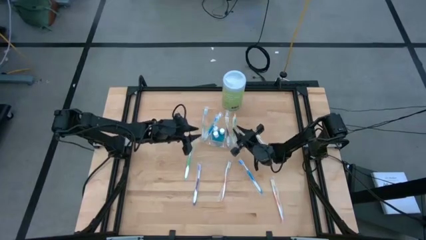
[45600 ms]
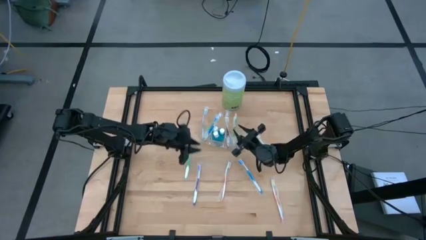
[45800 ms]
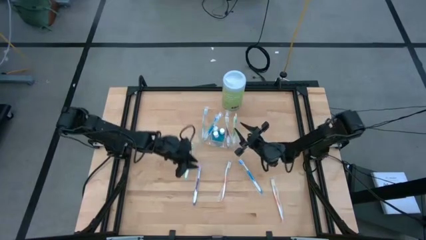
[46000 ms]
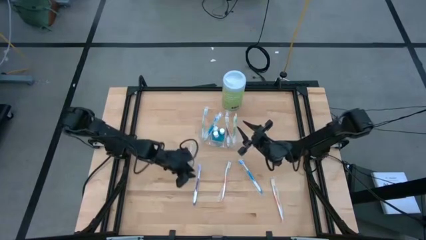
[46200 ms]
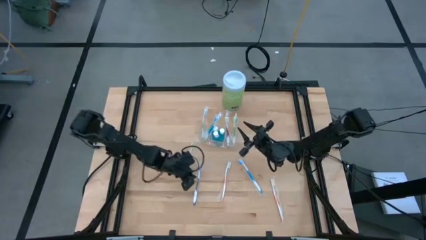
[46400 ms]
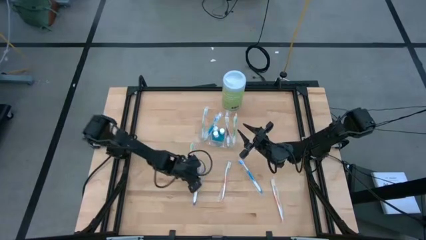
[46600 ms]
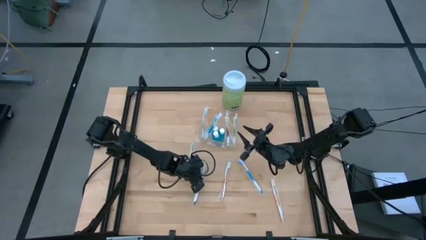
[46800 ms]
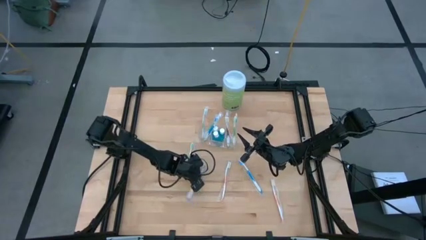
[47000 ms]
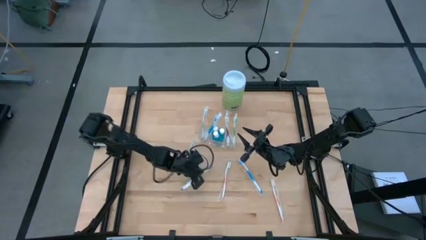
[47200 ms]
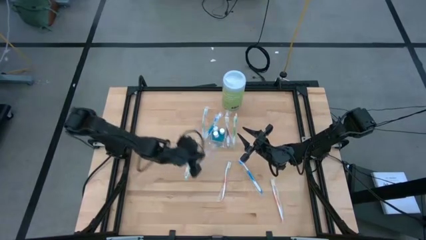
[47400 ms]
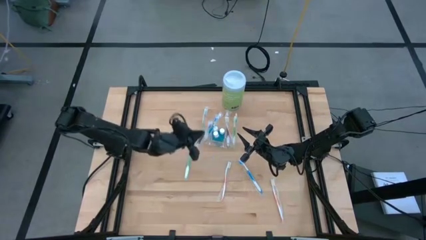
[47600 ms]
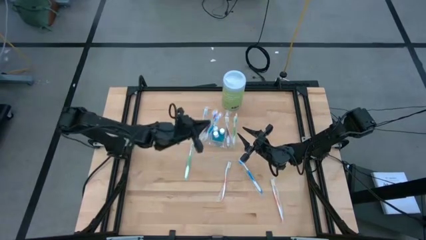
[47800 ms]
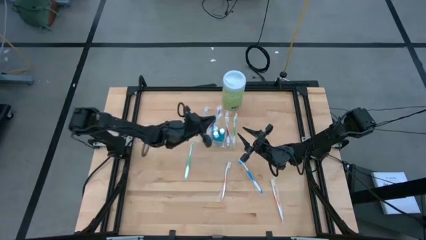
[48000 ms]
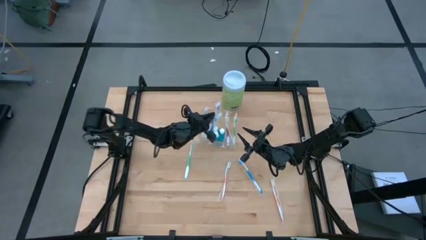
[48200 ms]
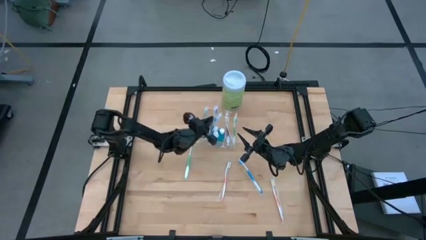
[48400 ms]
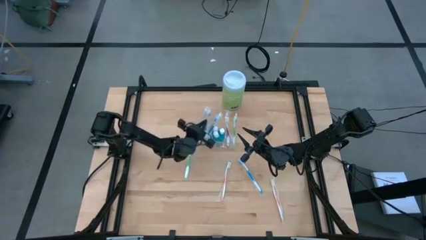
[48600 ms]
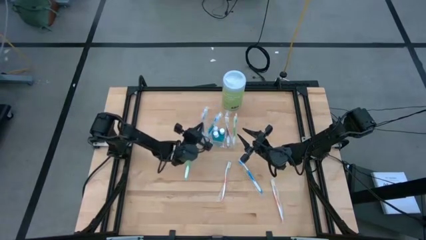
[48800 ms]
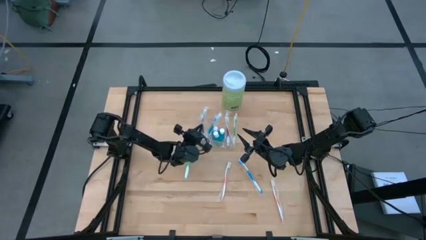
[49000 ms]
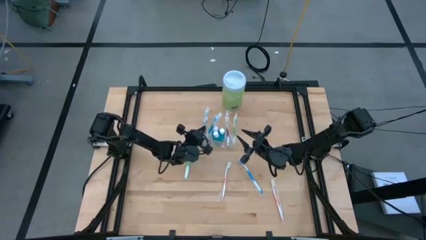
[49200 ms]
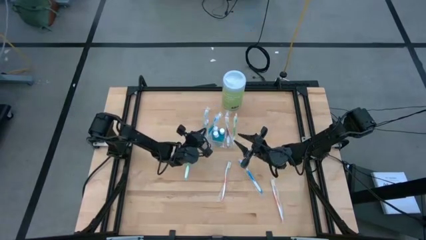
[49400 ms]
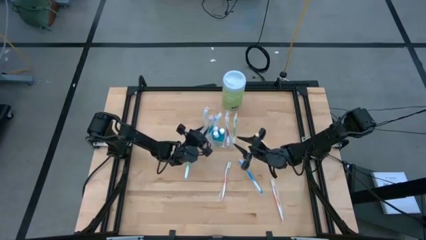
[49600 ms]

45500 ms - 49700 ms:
Task: Pick & Place toothbrushing station
Put the purple toothbrush into the transparent organizer

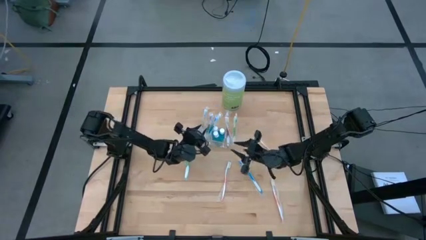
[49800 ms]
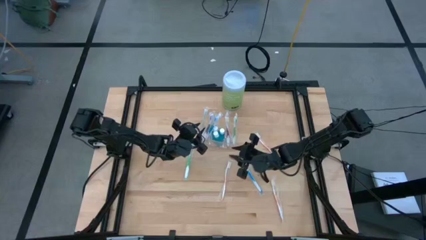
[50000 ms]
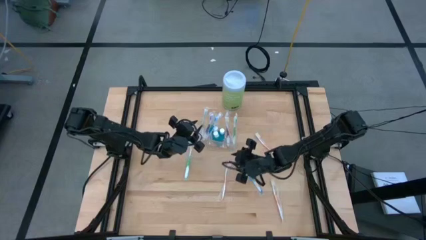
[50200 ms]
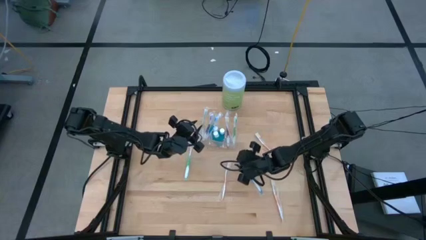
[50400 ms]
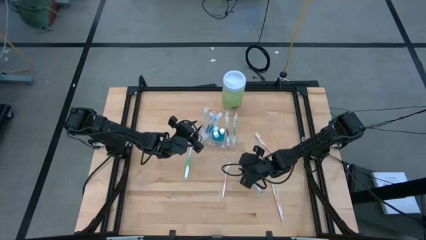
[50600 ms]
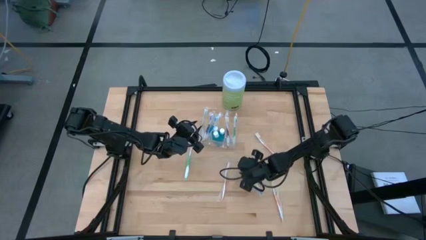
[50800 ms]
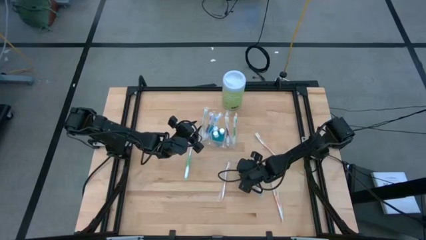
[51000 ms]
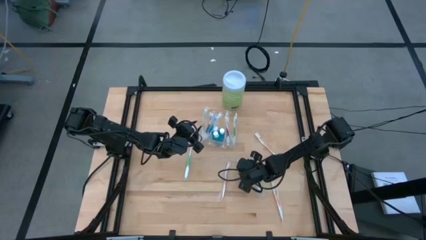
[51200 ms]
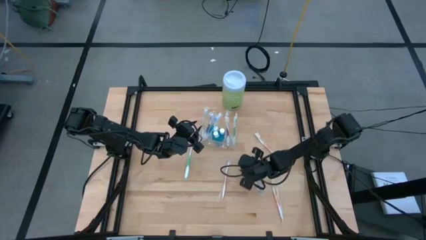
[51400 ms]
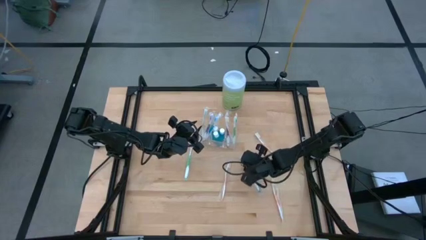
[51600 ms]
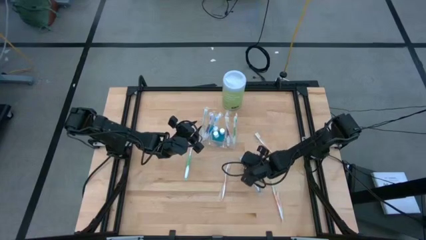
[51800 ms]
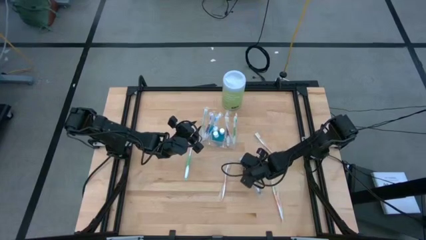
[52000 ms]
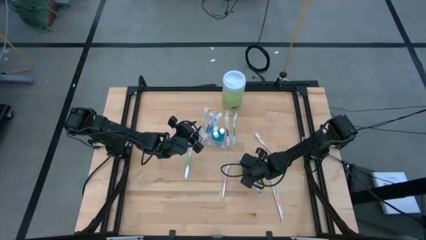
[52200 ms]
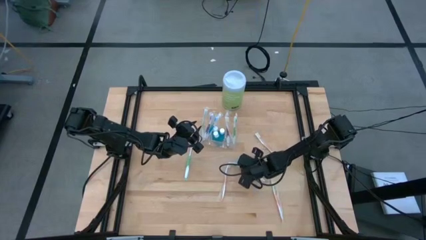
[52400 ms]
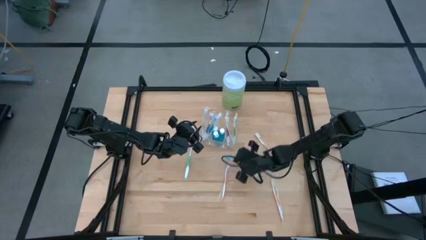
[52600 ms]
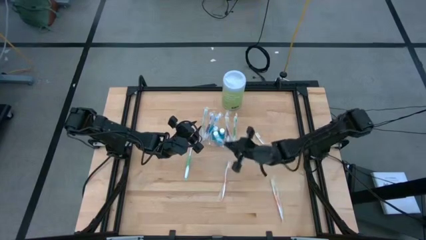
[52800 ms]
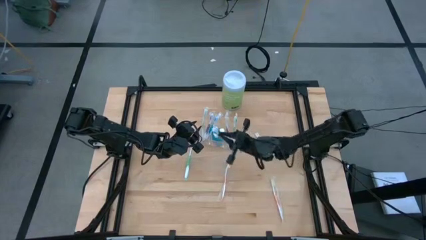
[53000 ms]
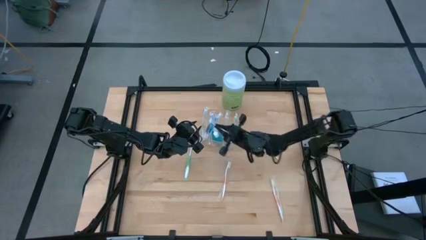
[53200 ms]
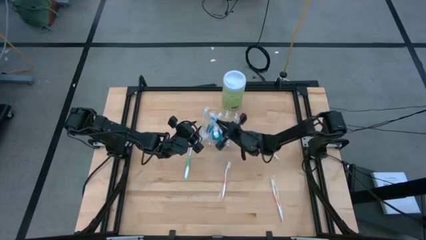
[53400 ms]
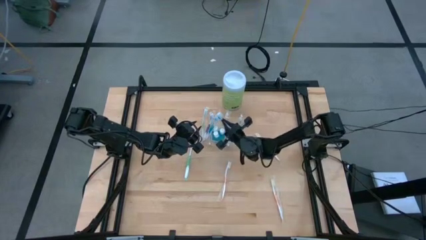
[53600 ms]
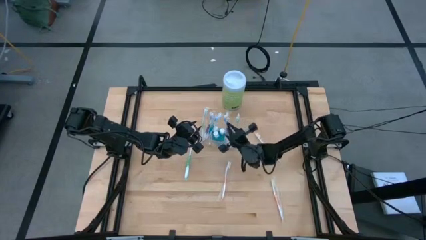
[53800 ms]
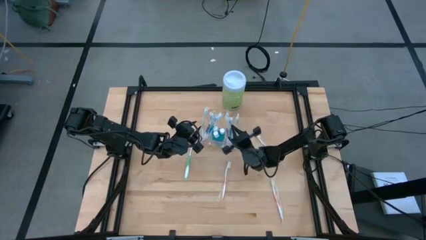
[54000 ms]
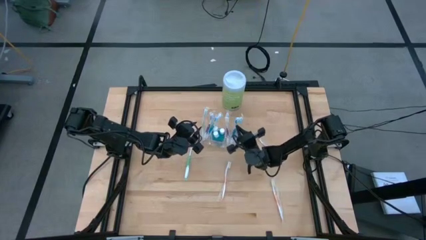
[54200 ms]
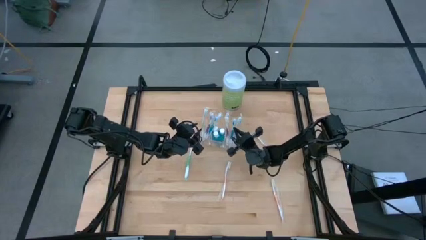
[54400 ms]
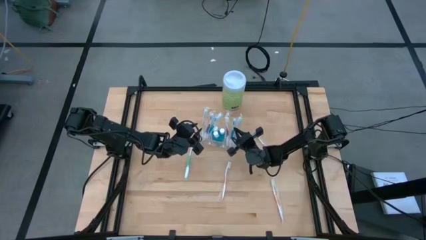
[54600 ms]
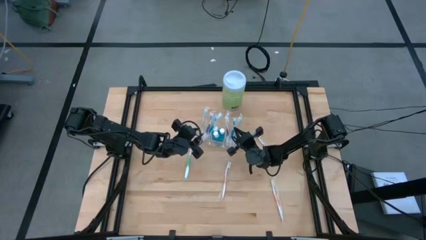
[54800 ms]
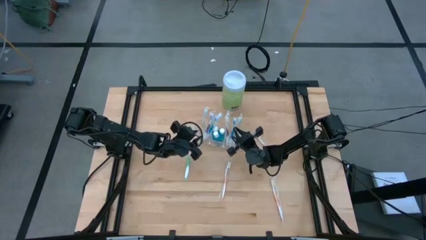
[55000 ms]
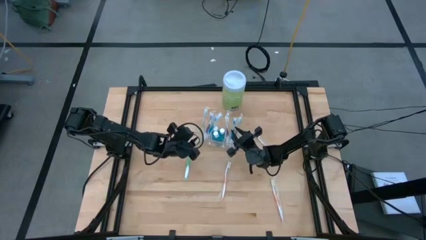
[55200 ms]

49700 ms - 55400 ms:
Put the blue toothbrush into the transparent organizer

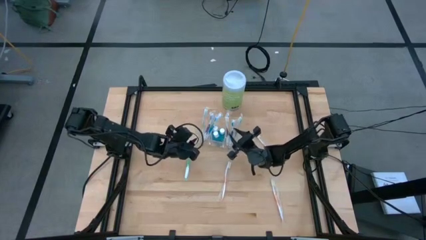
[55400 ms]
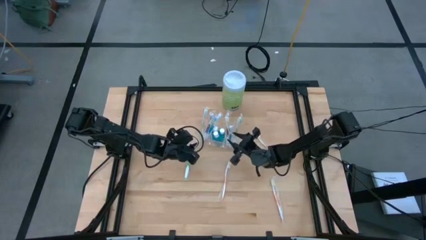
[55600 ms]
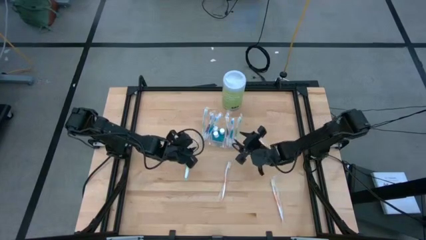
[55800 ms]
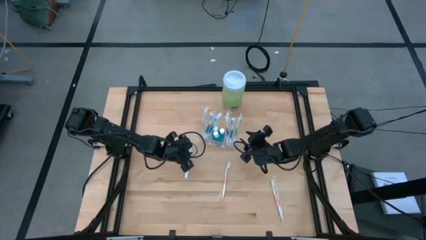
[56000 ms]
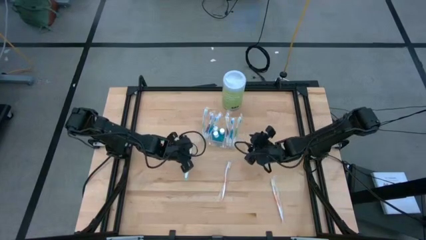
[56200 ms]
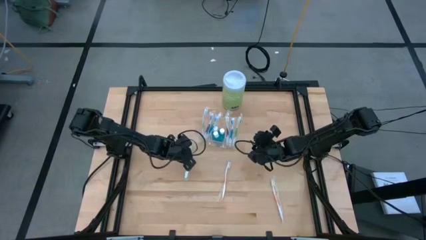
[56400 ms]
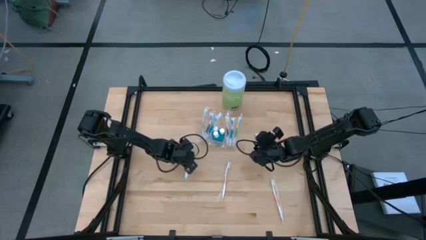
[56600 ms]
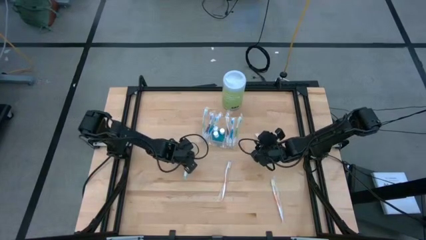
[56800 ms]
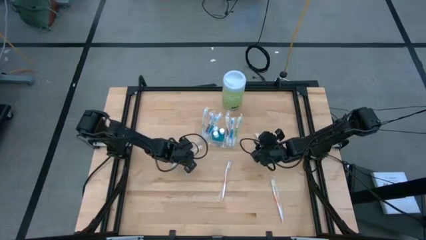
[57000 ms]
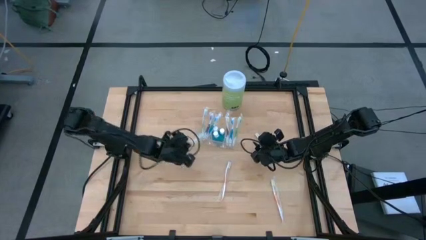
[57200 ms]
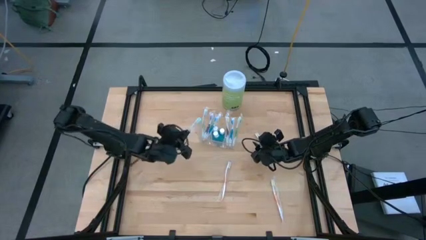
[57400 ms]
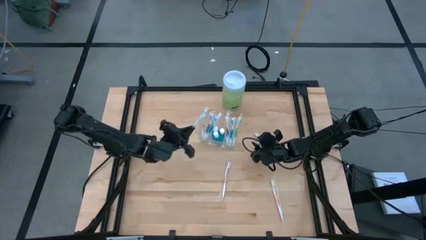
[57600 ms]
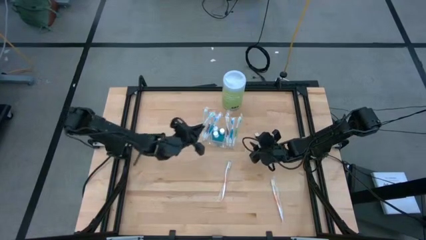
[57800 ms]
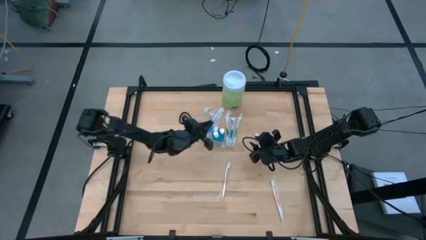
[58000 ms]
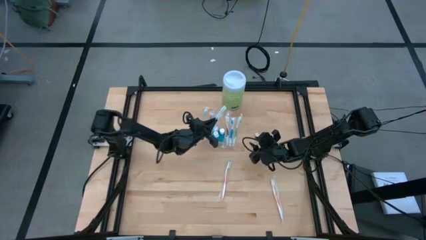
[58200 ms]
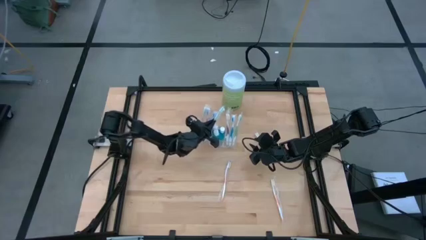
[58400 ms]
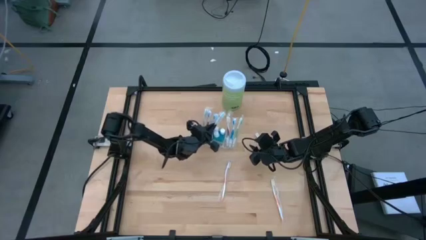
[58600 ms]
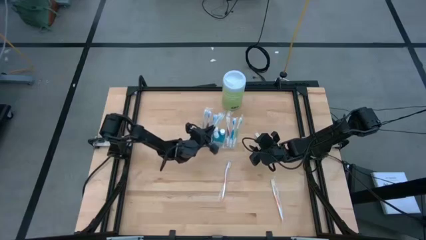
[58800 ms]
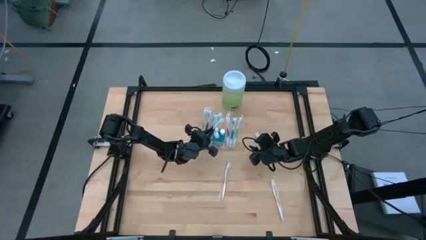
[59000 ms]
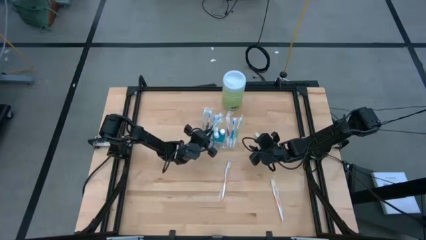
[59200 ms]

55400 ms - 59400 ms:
Put the green toothbrush into the transparent organizer

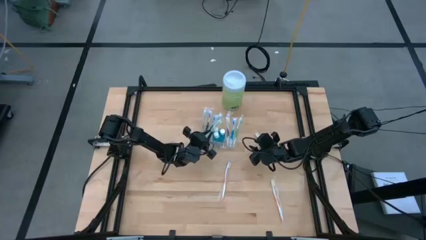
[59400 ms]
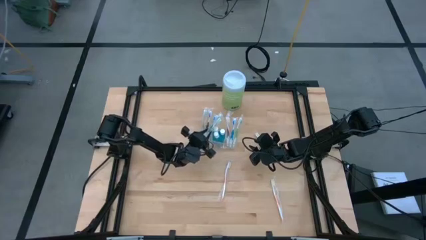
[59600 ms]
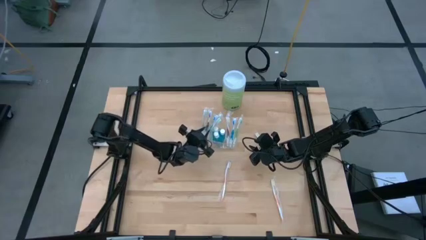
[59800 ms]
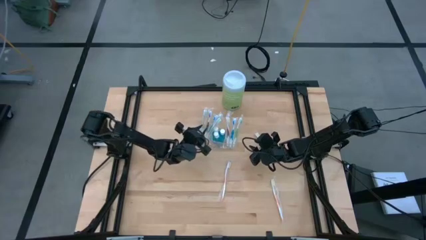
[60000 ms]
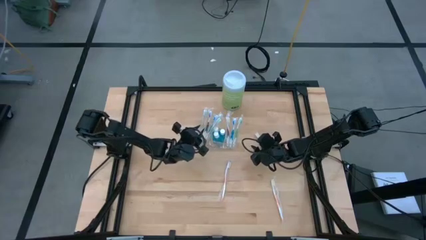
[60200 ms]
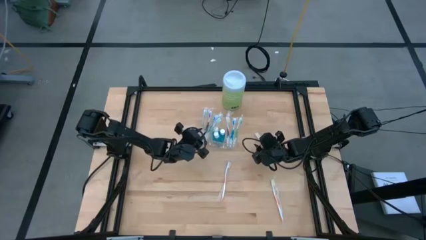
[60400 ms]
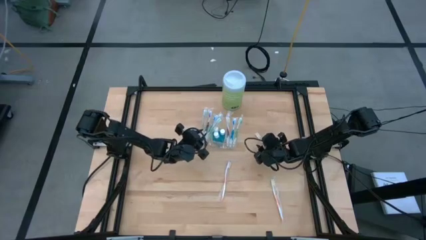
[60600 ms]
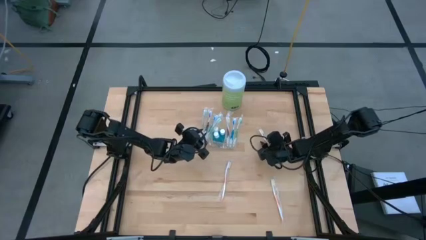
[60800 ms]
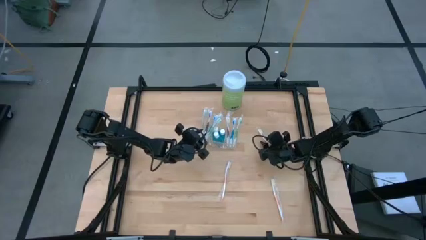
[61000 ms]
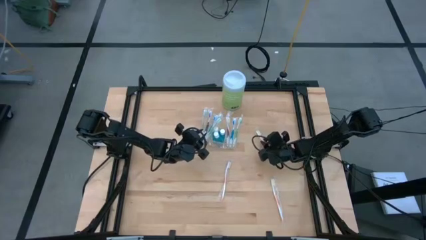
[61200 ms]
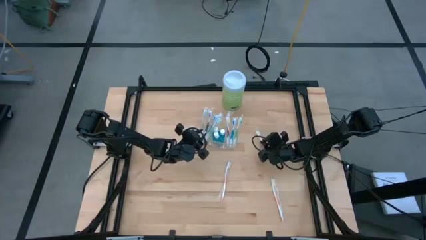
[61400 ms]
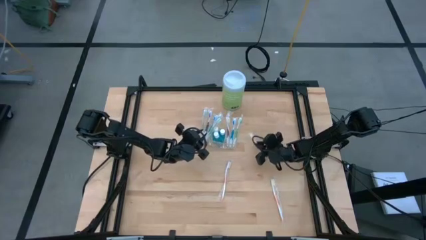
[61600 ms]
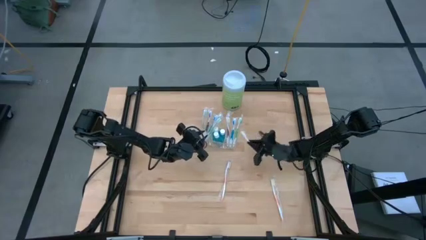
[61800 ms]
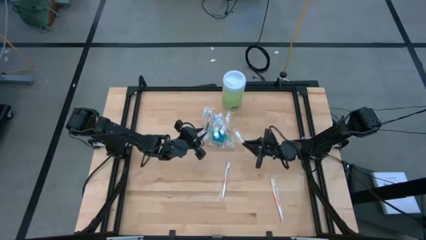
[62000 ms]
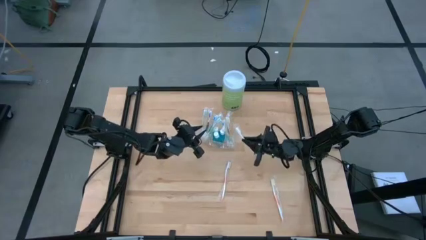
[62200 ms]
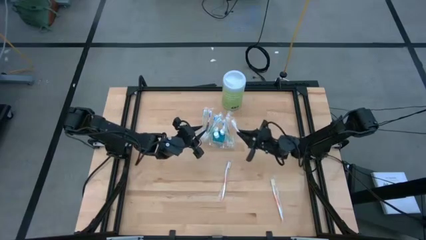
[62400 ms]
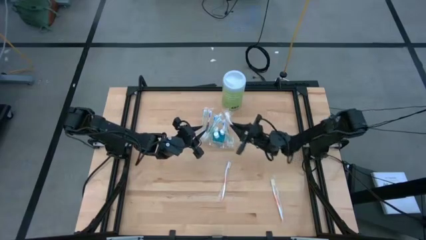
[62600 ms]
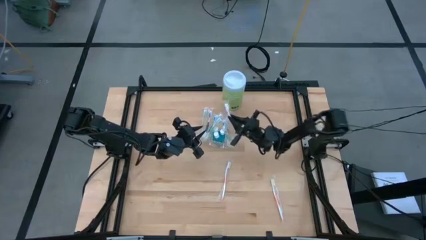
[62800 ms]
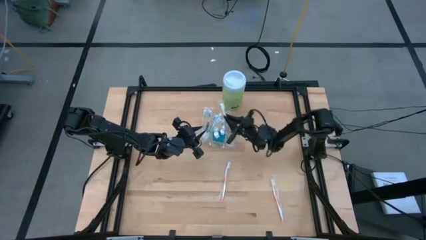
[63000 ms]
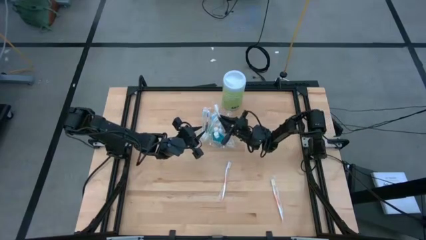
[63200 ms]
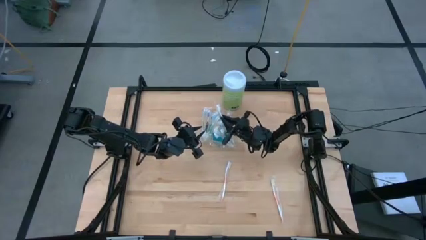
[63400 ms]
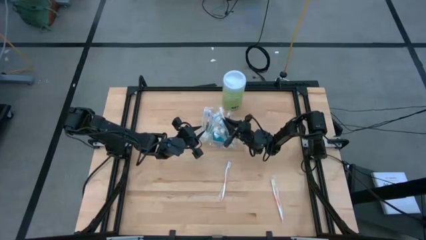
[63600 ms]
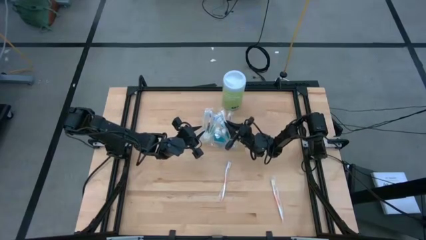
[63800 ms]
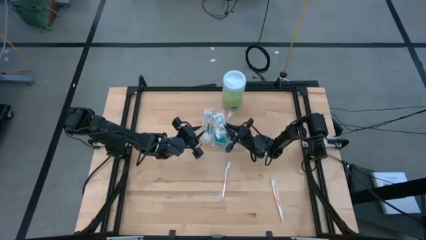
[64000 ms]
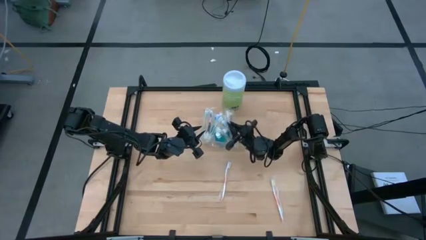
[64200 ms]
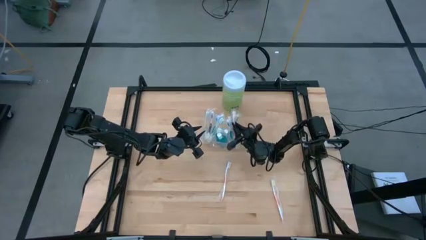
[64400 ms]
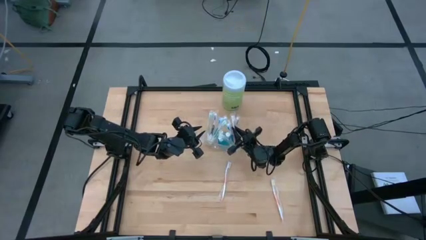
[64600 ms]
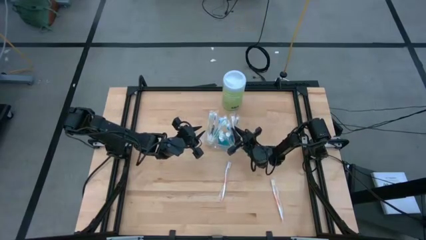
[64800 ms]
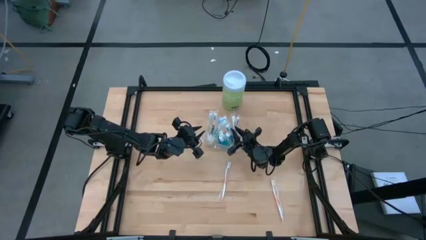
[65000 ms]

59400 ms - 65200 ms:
Put the orange toothbrush into the transparent organizer
